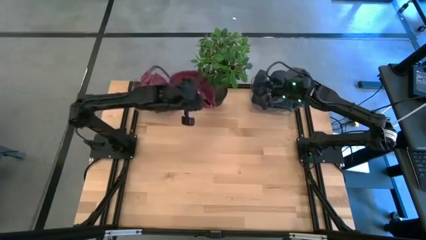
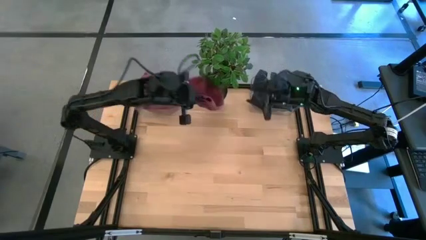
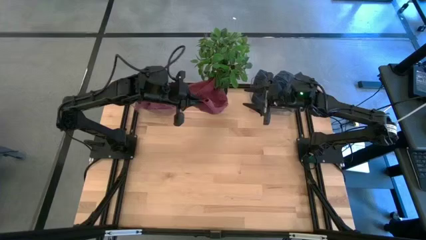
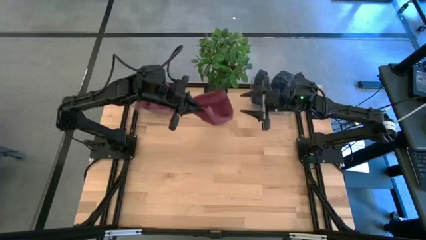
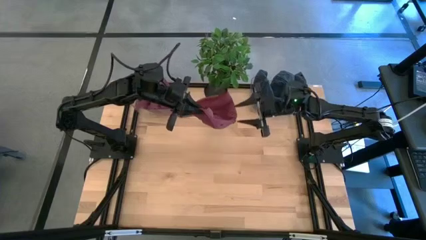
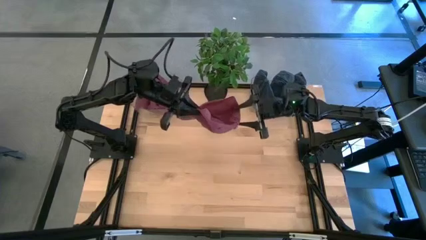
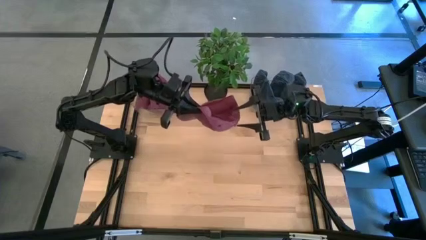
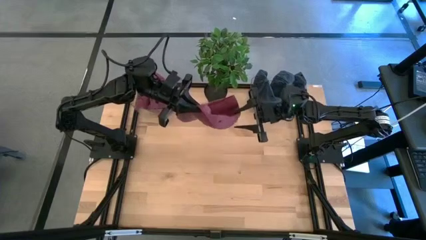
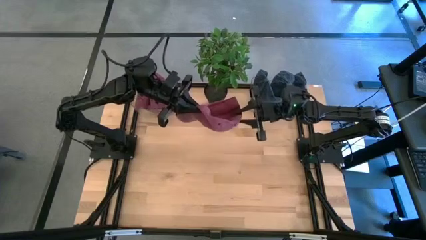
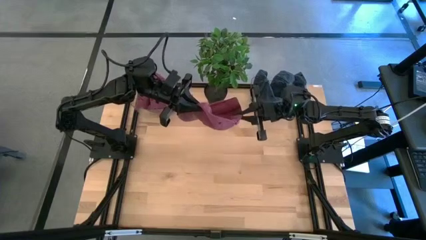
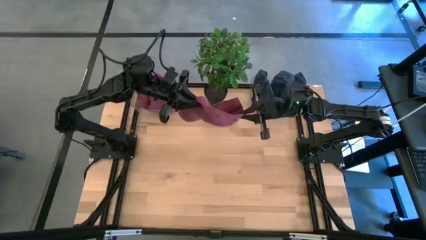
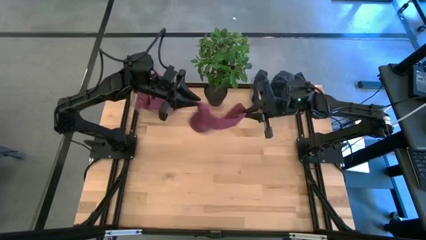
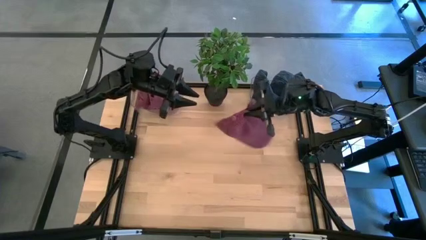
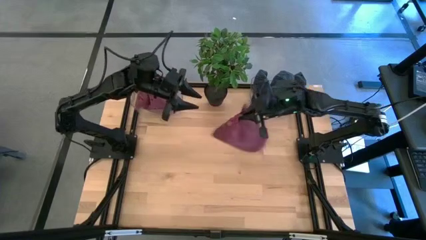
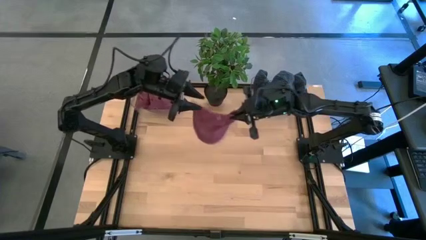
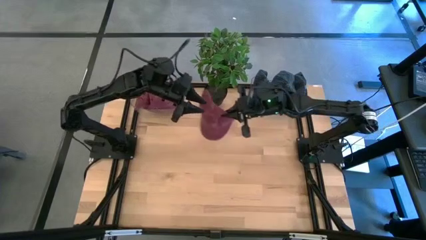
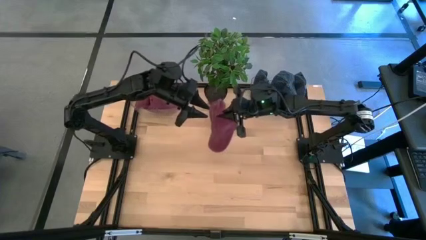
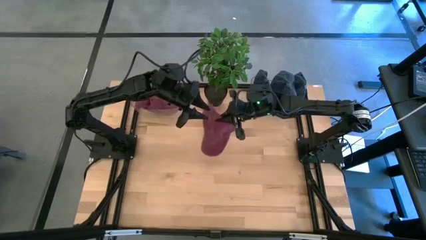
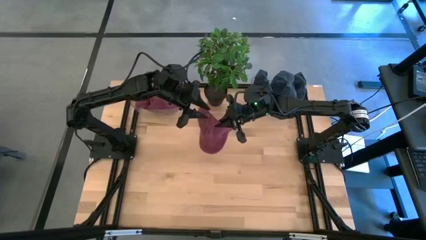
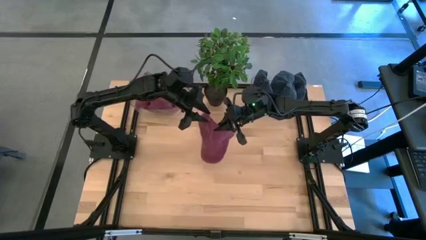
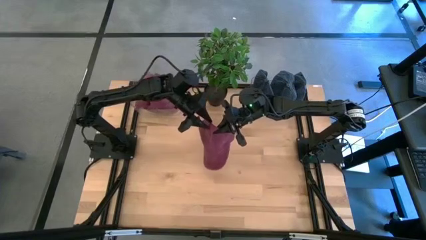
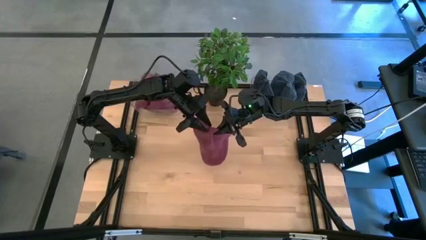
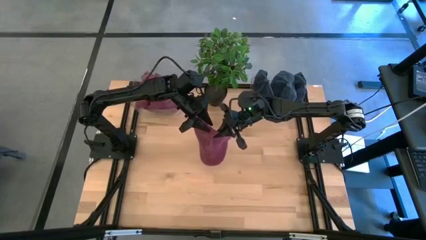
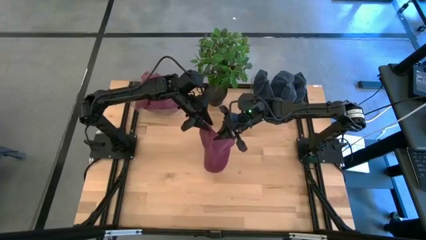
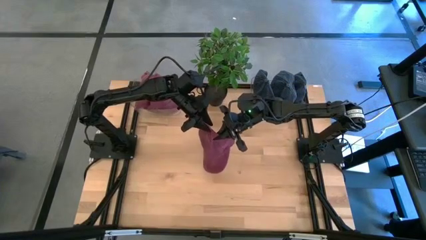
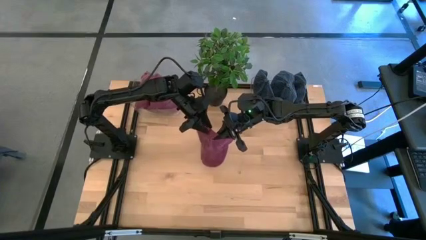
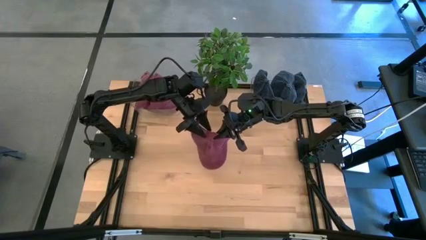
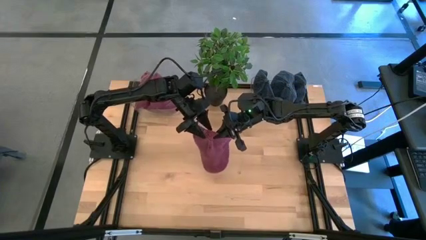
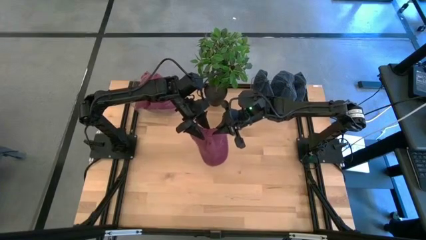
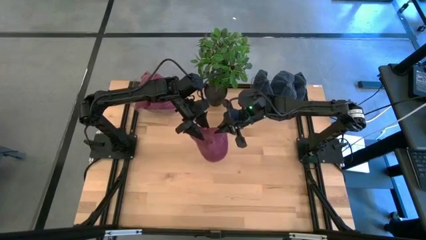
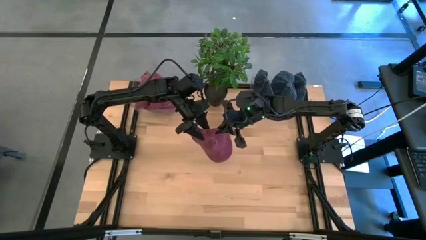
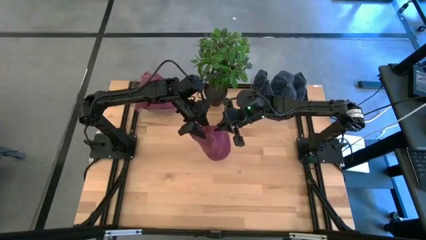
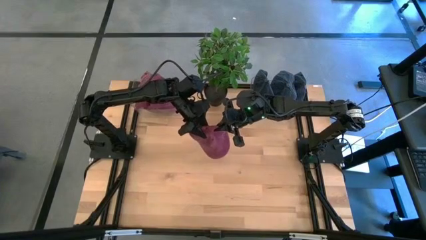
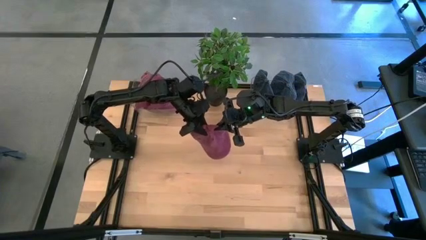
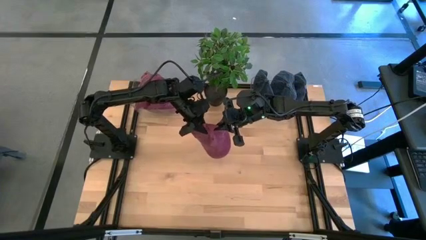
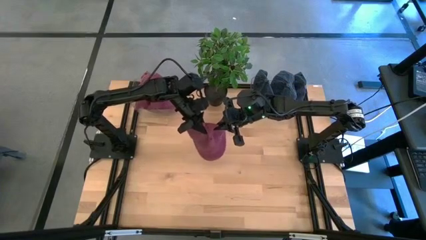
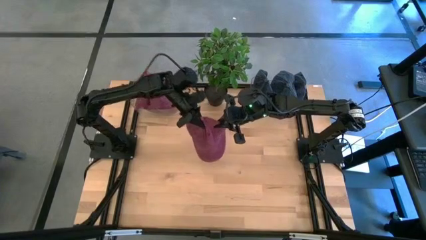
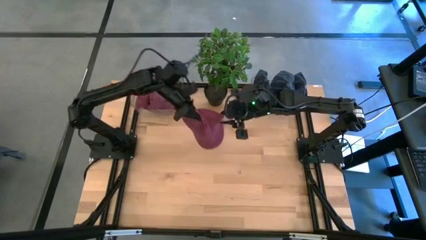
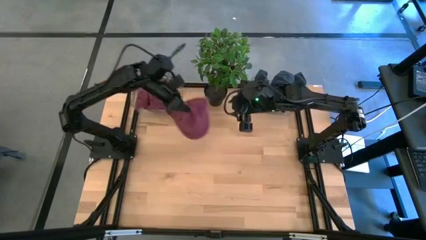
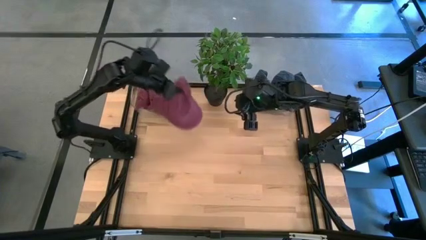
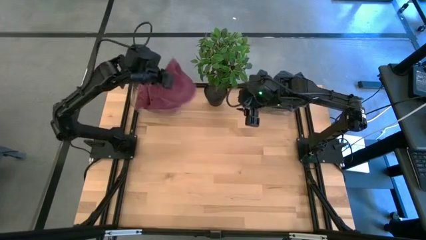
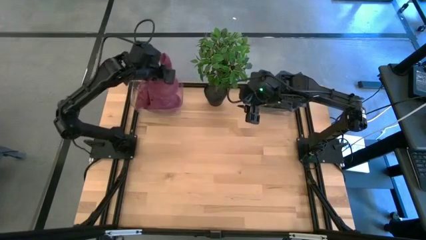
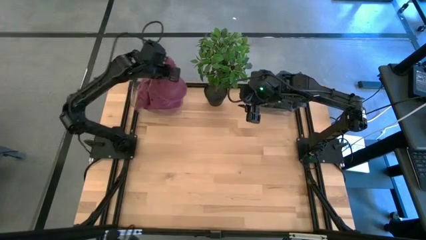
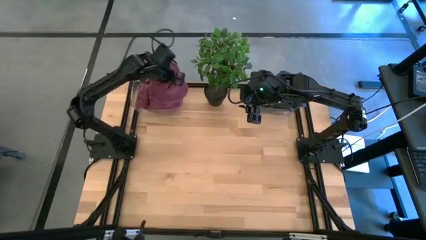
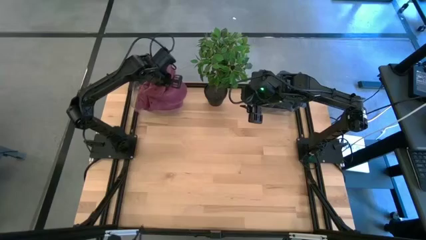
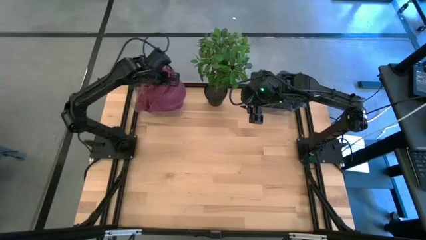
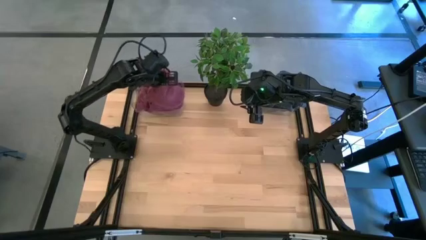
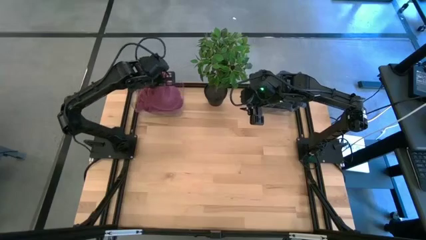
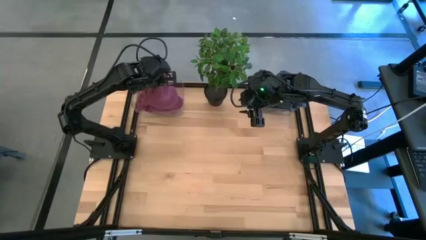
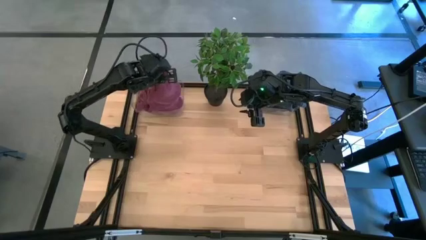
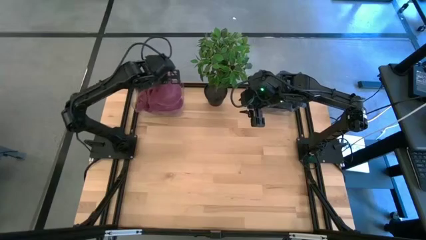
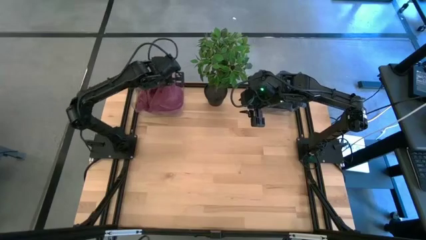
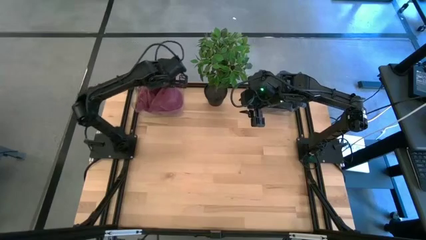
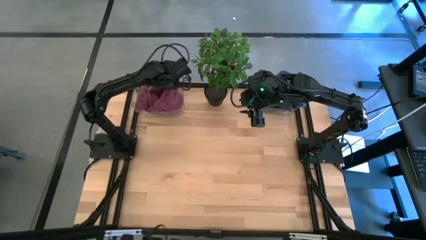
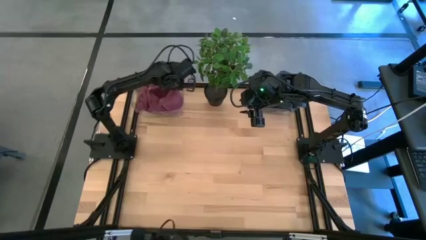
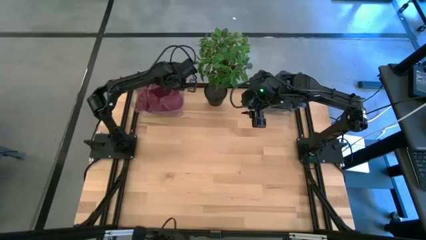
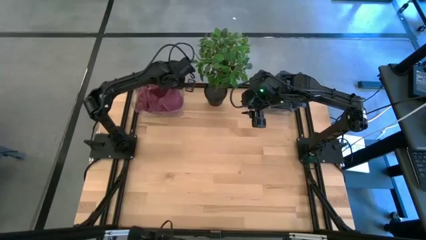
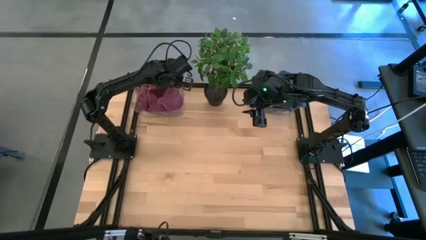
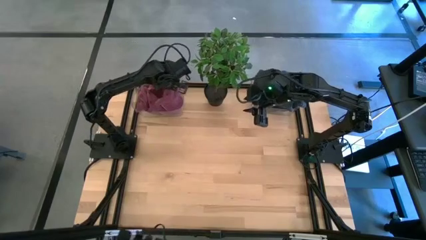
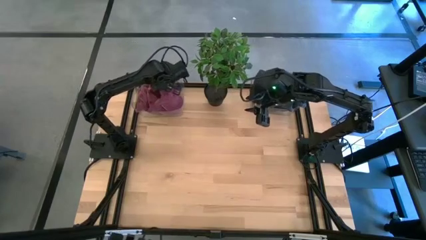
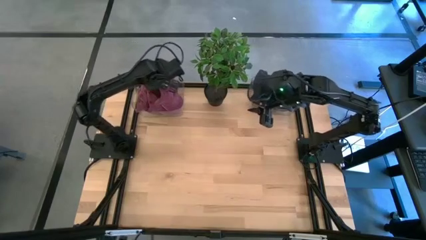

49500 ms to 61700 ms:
Task: Pick & Place hat
Put the red cap into the left transparent bin

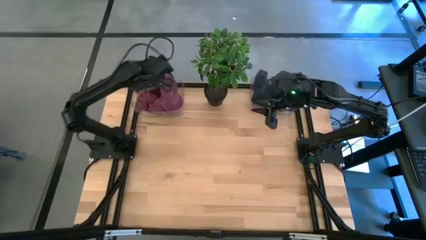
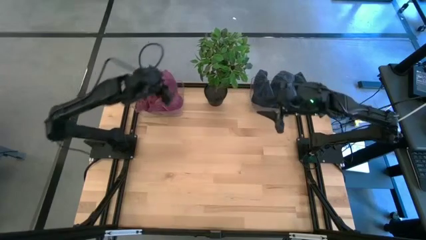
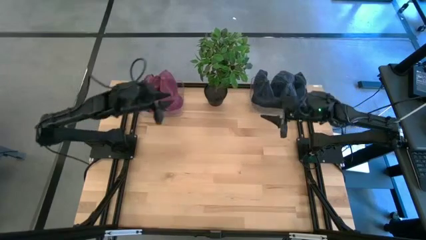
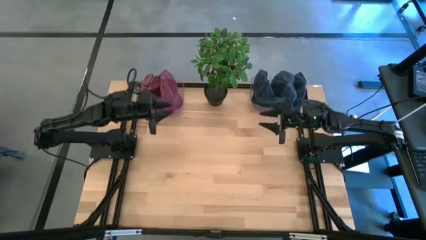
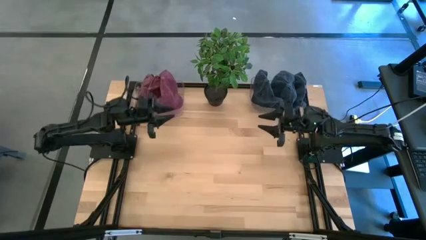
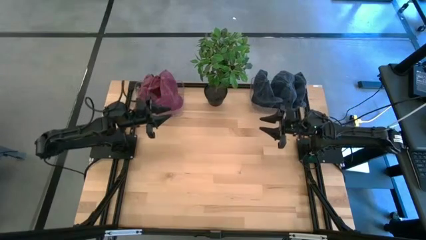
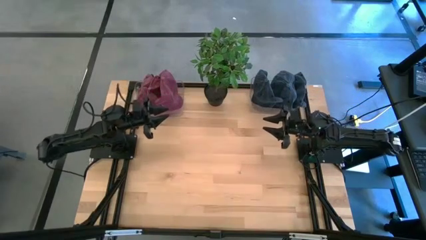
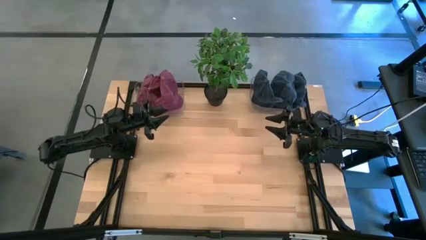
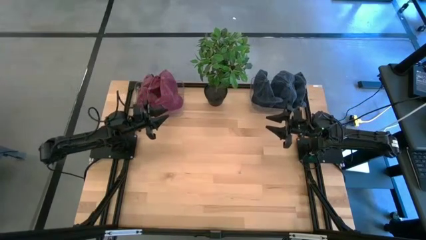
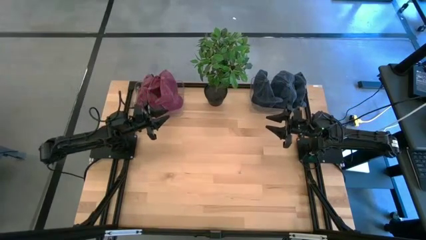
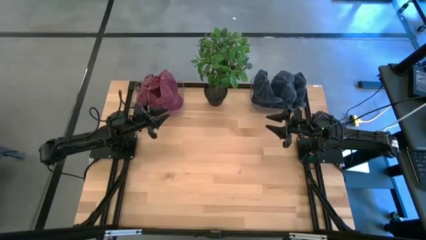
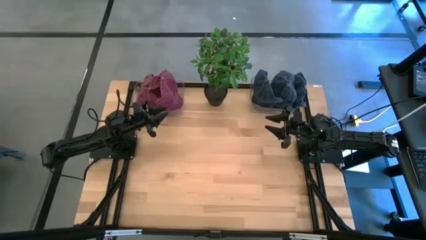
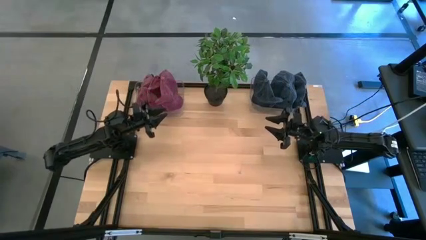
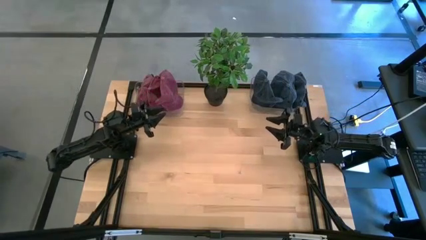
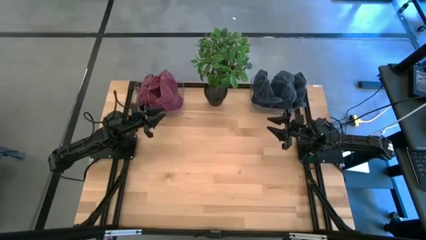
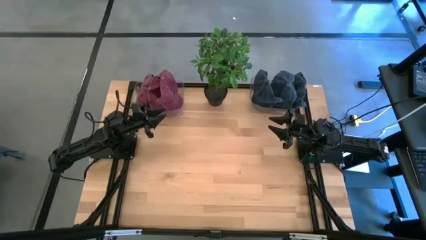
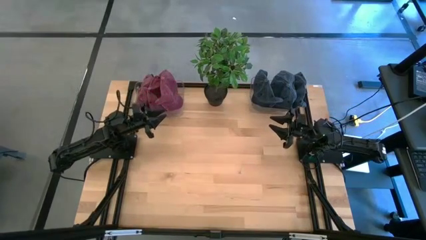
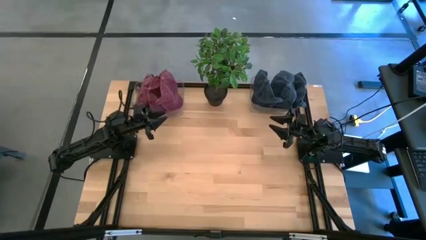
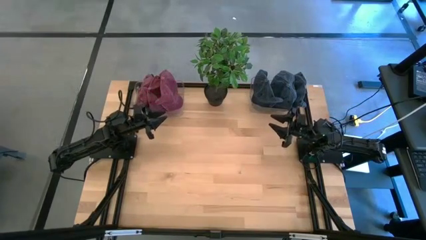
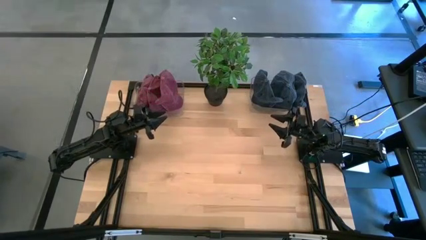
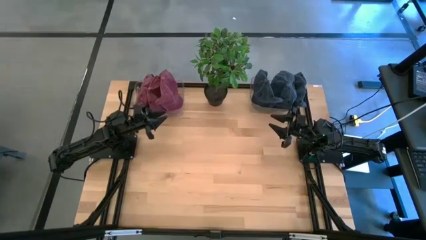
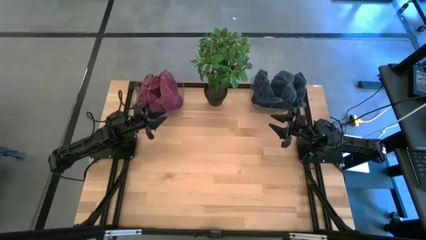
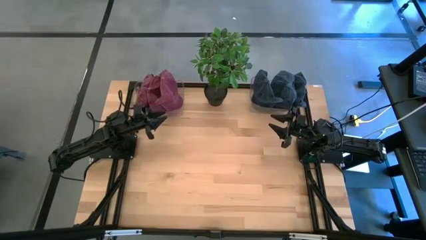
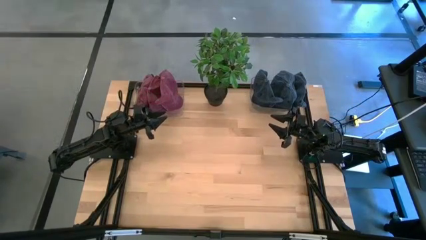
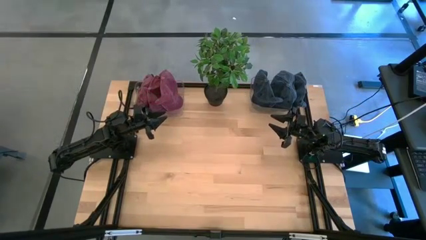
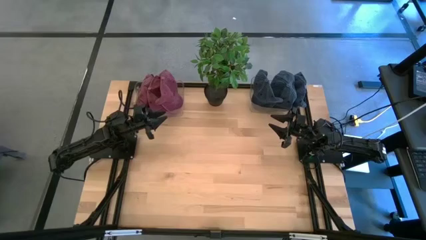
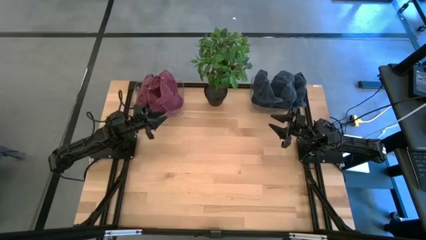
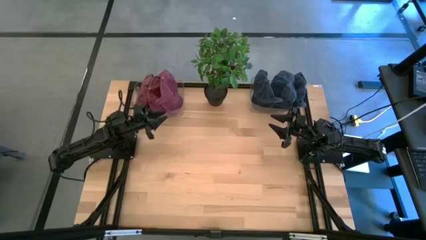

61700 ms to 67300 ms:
Return to Home Position
